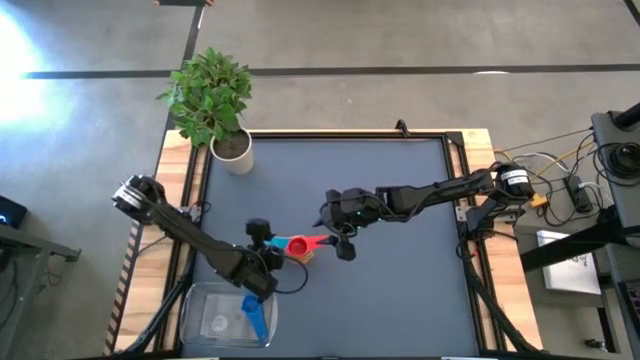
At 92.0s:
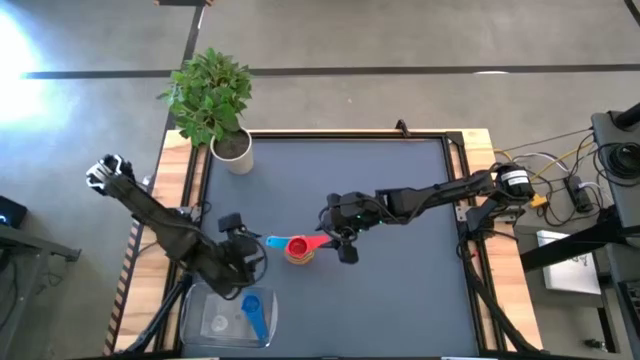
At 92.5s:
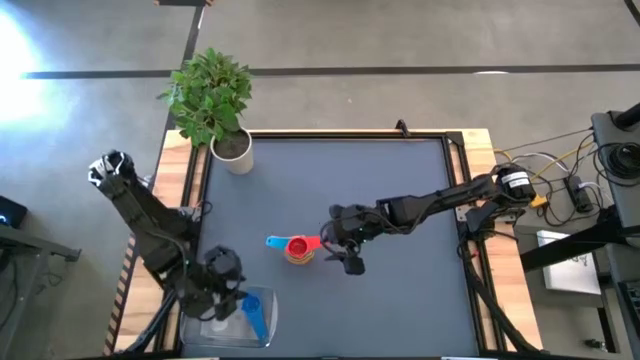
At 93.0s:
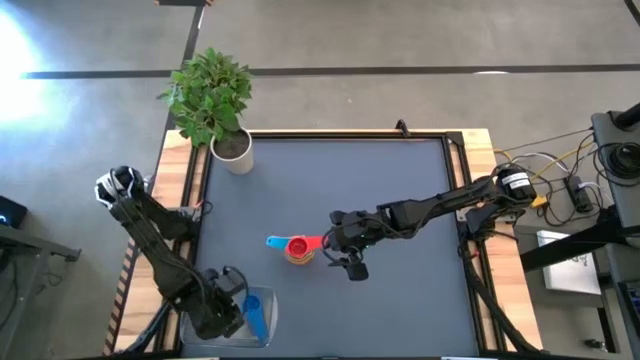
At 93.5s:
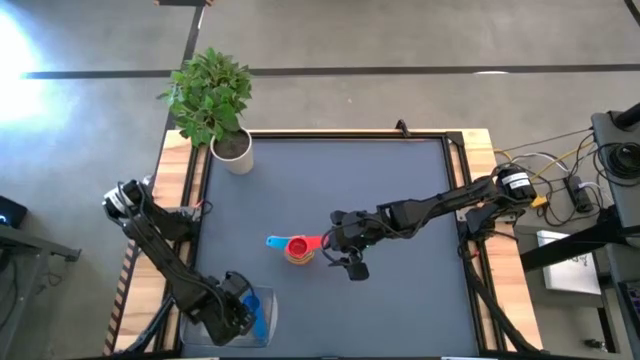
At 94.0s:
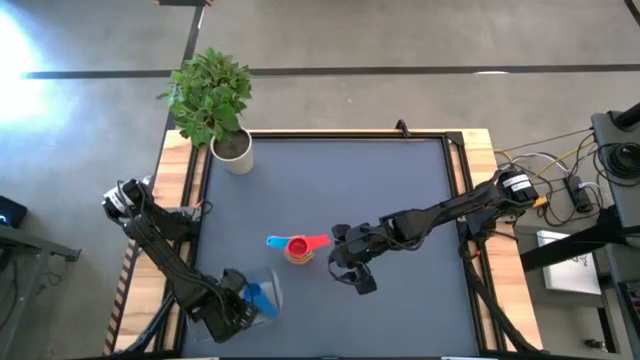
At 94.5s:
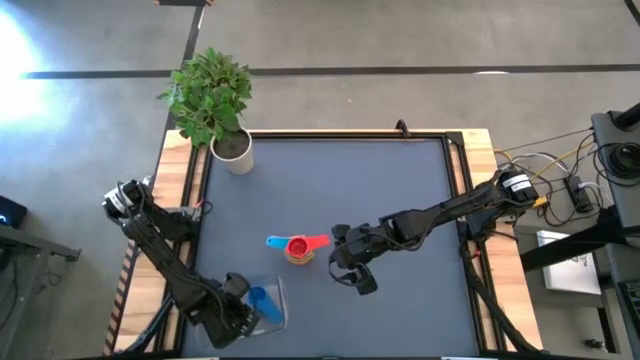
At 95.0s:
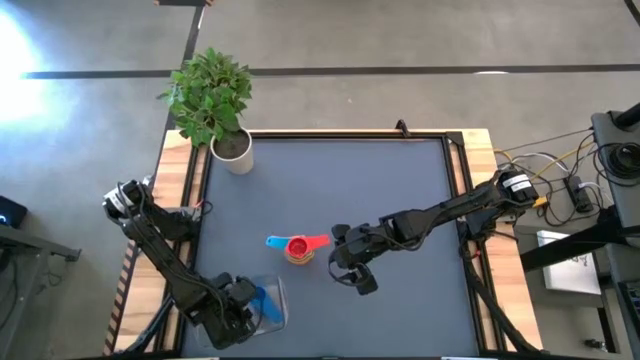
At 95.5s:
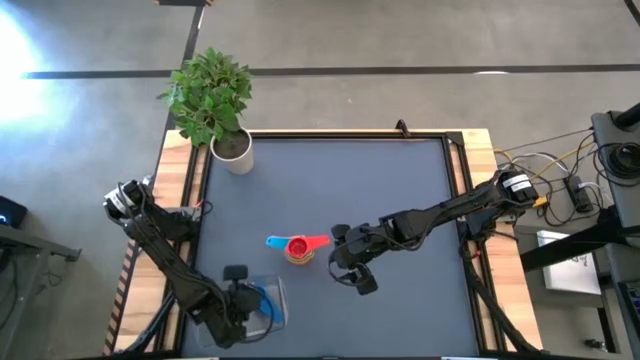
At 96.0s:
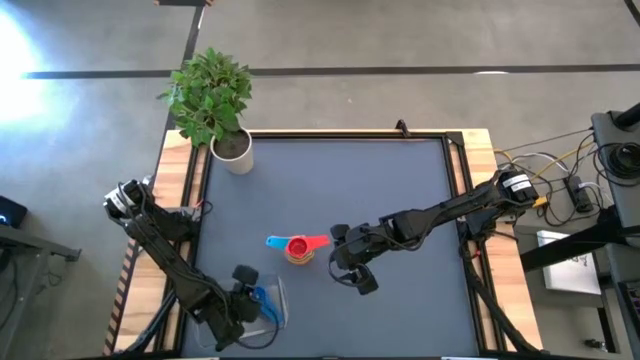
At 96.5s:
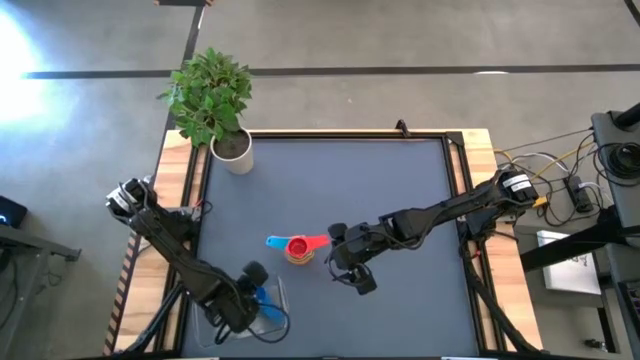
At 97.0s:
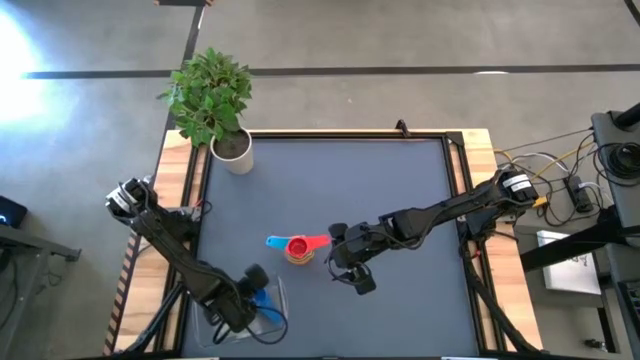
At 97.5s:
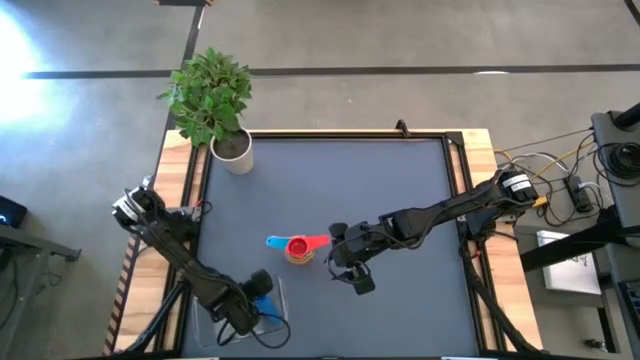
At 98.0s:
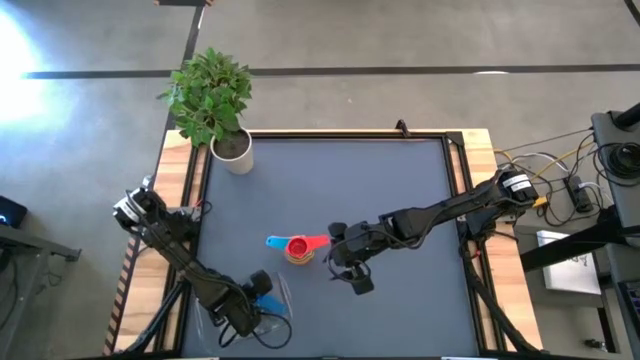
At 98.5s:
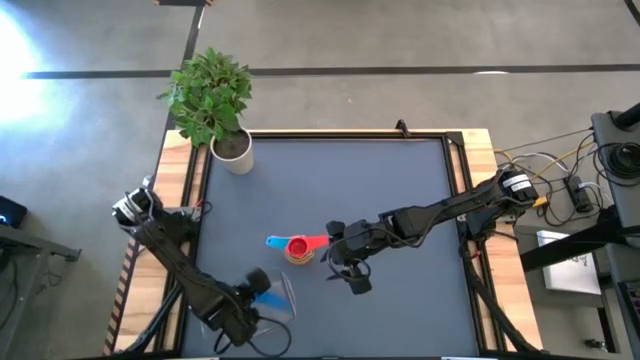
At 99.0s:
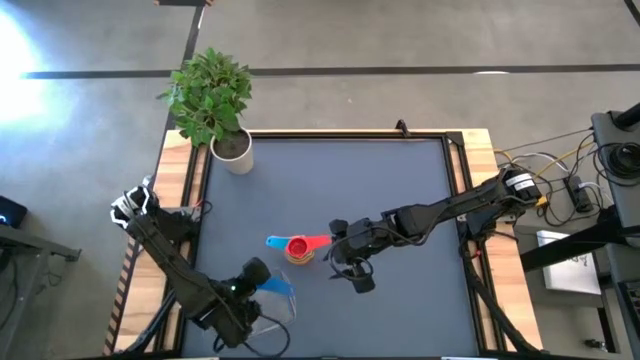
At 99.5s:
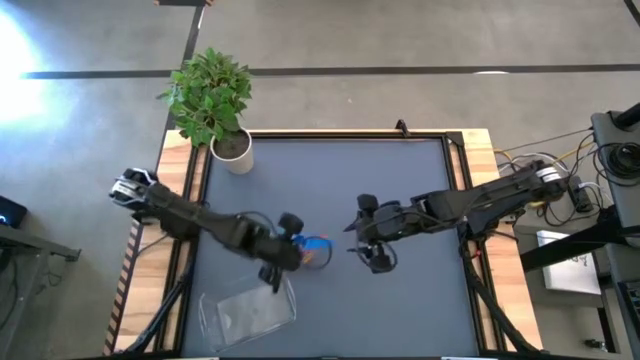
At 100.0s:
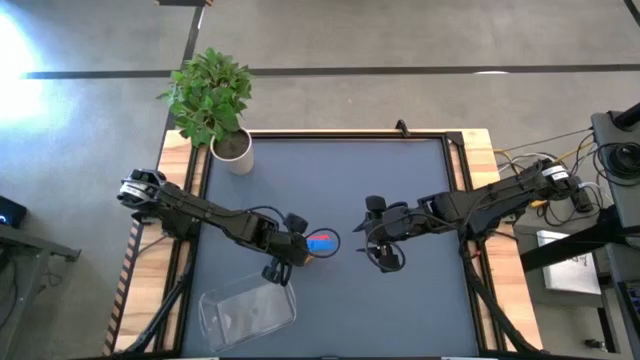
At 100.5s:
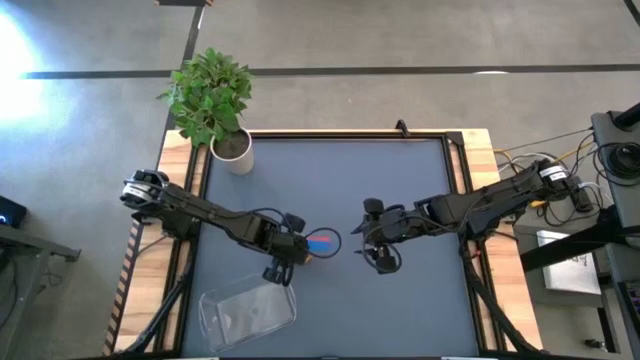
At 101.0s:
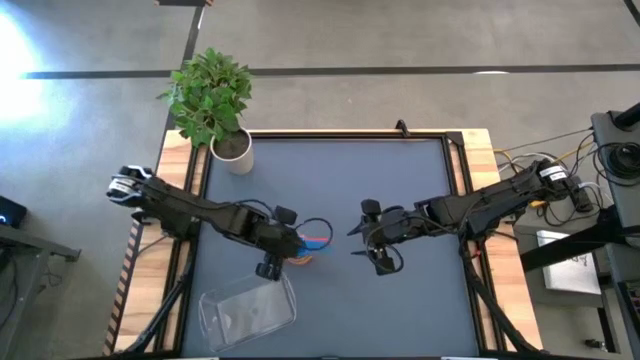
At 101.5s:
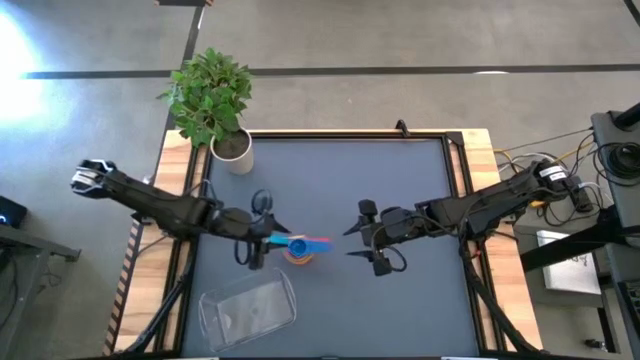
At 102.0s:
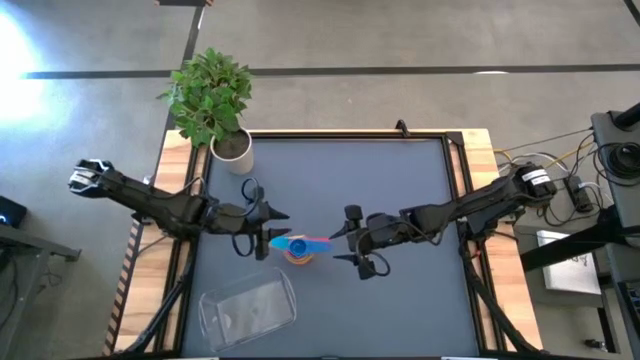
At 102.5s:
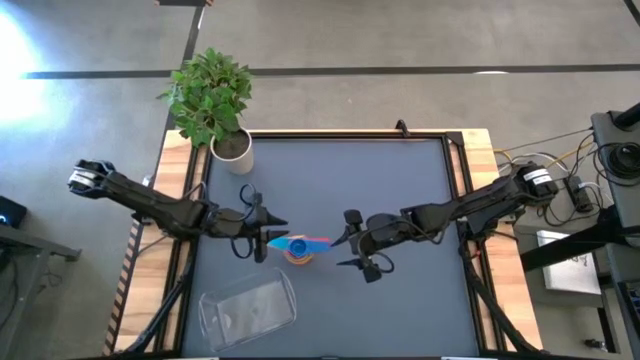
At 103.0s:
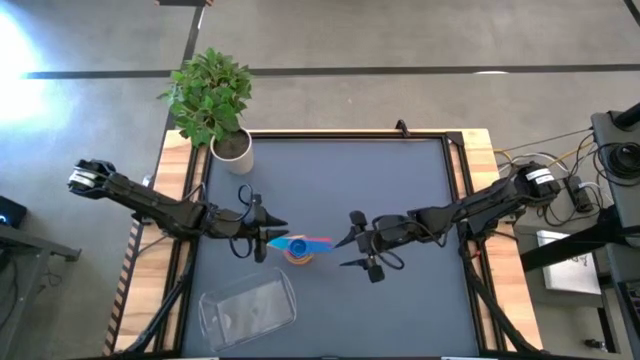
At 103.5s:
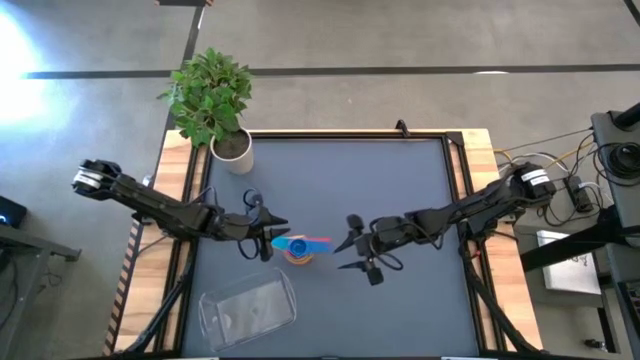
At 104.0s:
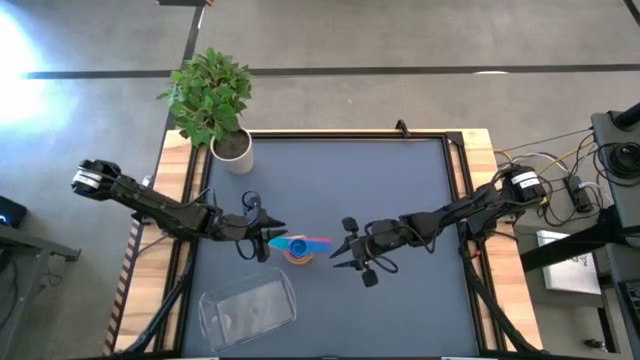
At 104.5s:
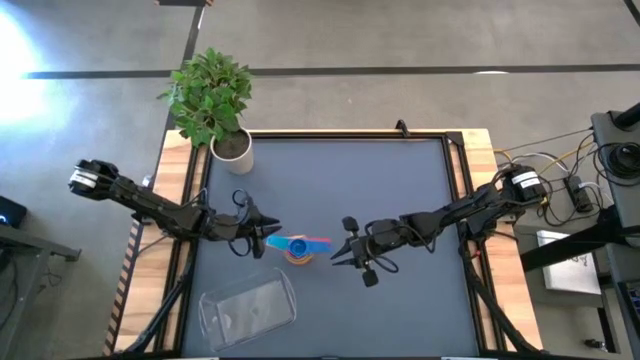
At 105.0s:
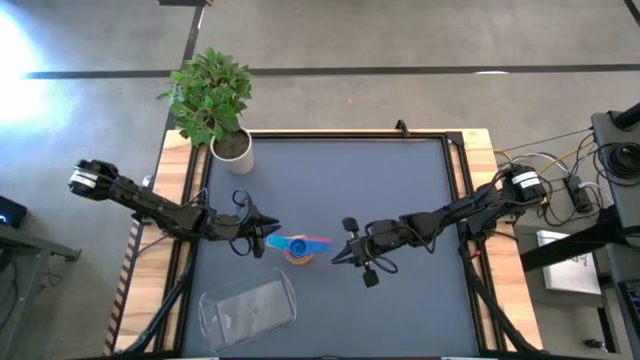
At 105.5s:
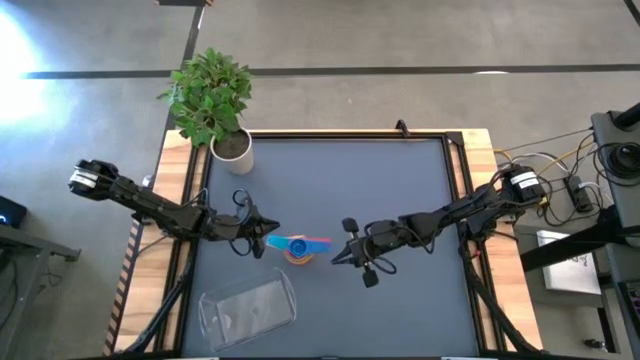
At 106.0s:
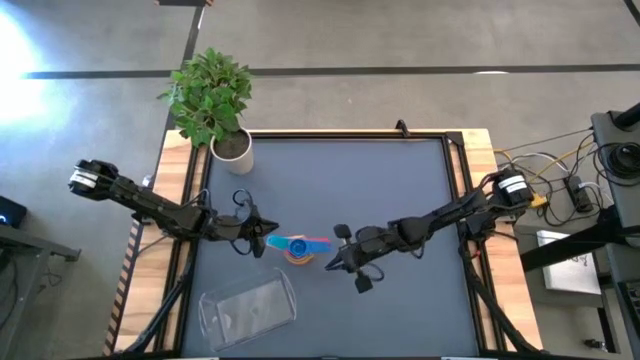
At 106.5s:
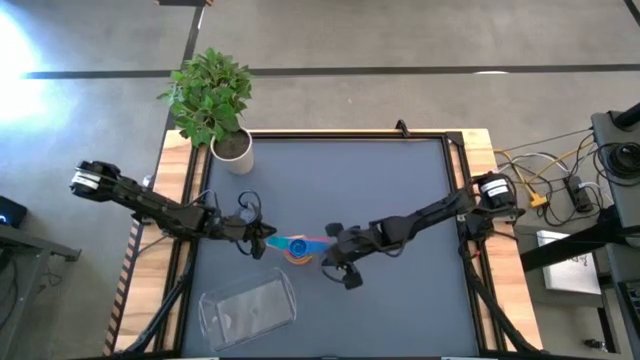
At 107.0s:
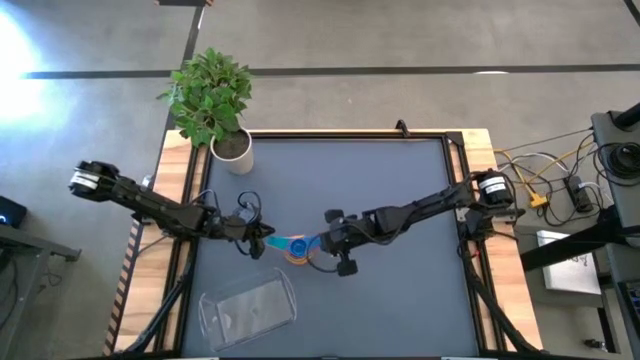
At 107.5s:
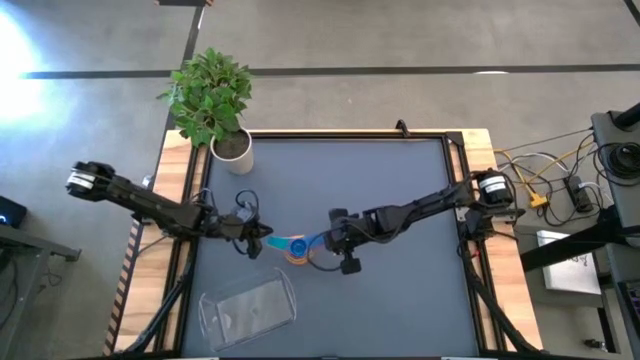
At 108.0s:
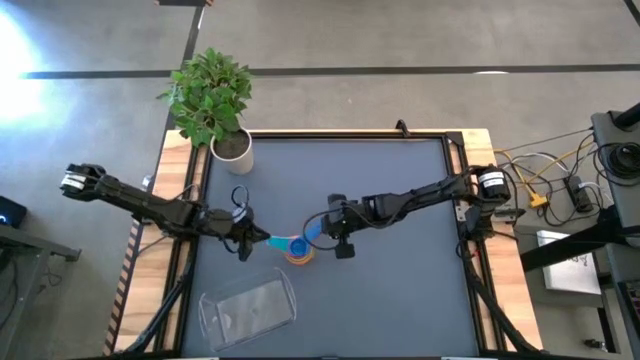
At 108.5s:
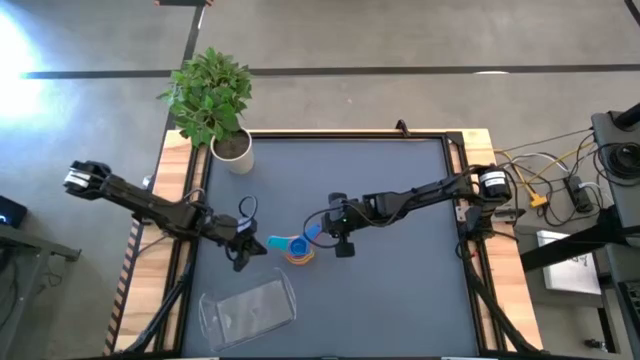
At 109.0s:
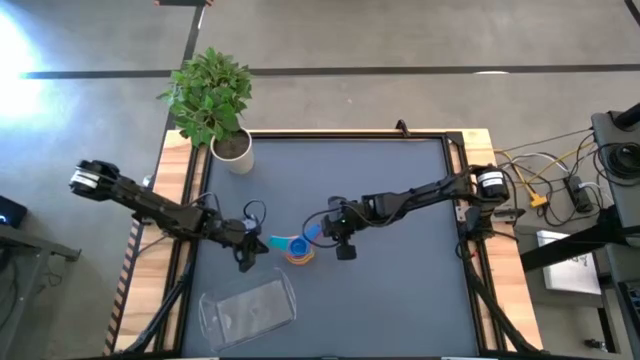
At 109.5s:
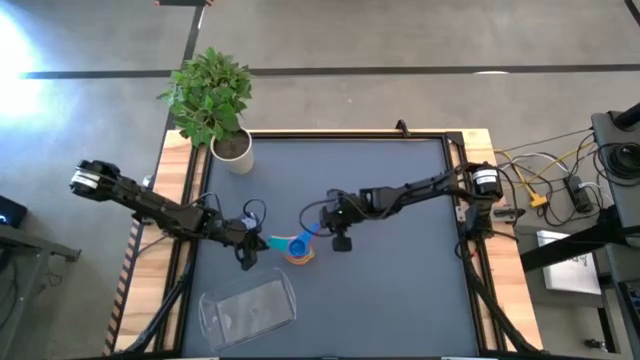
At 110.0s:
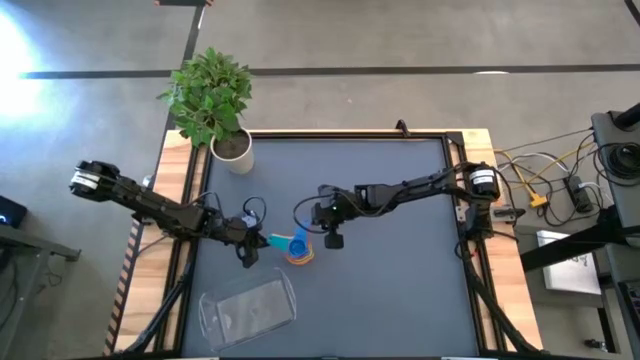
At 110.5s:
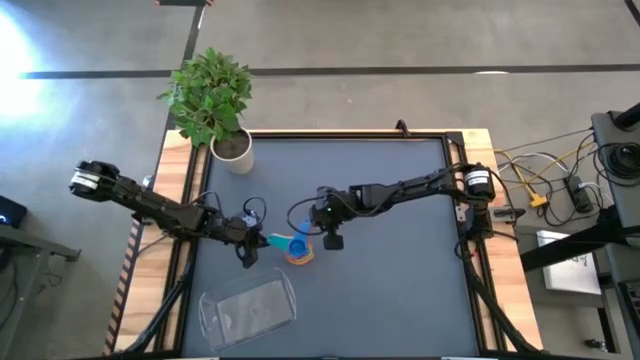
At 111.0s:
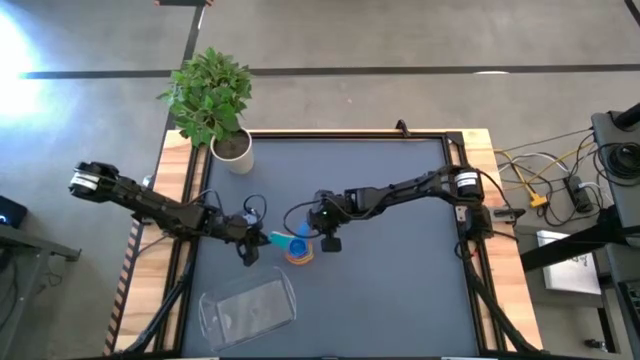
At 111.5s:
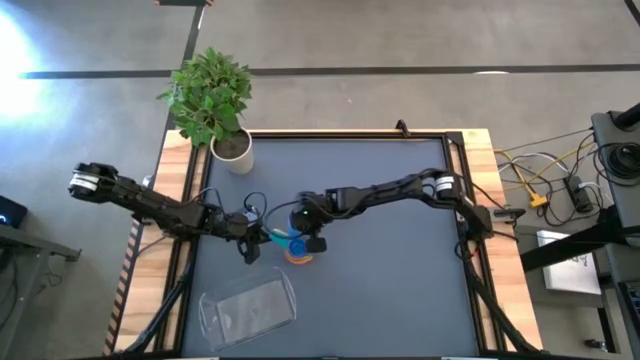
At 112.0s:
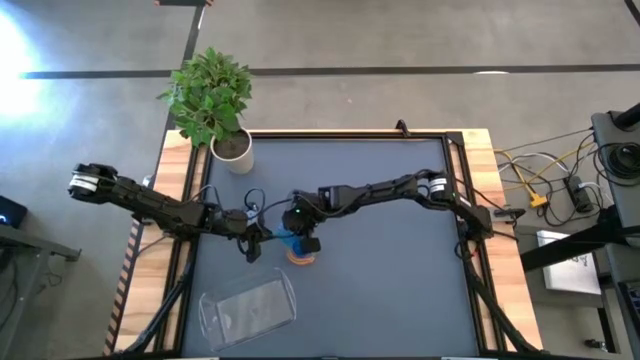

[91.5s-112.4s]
Task: Nest measuring cups in basket
Stack the blue measuring cup into the red measuring cup
